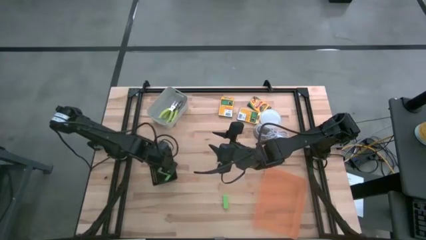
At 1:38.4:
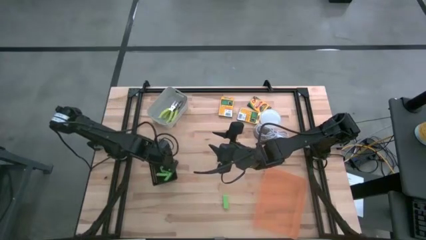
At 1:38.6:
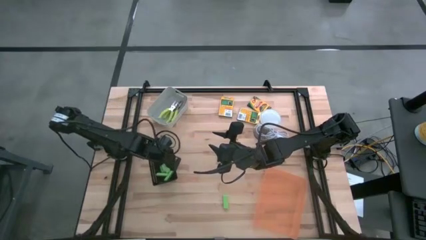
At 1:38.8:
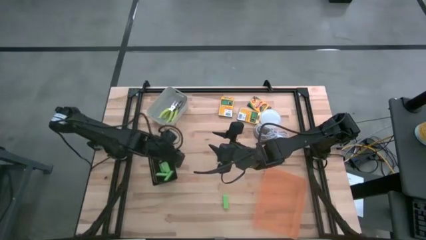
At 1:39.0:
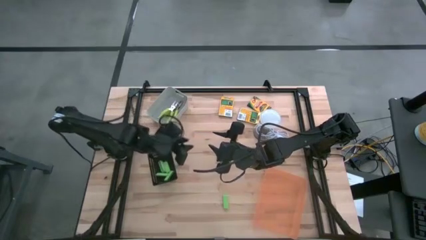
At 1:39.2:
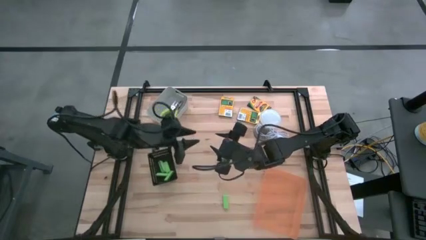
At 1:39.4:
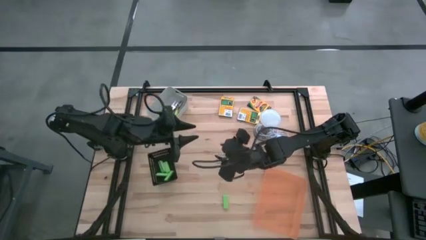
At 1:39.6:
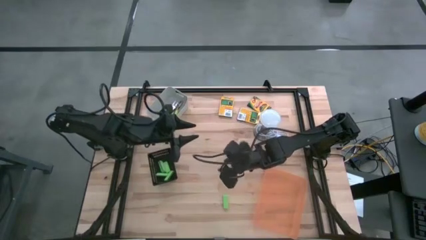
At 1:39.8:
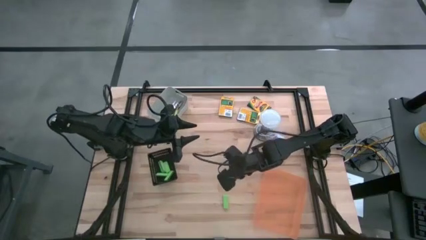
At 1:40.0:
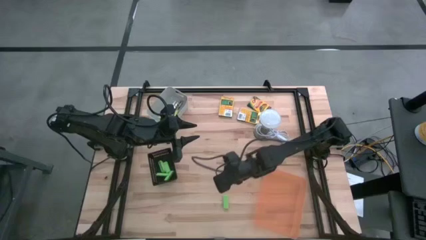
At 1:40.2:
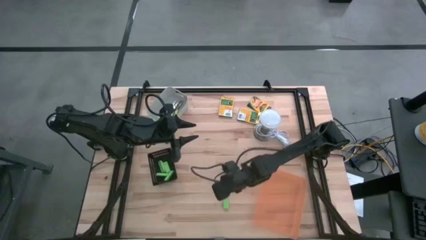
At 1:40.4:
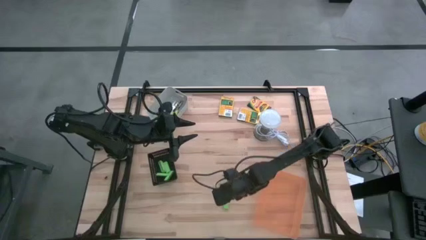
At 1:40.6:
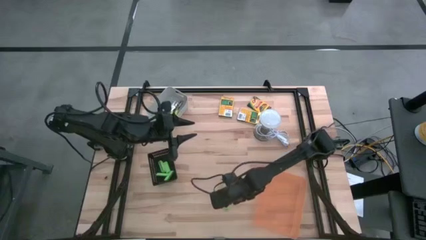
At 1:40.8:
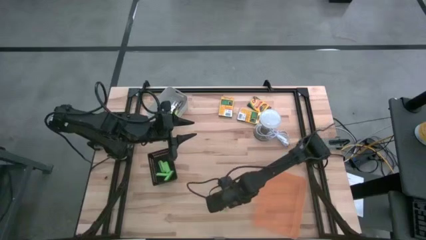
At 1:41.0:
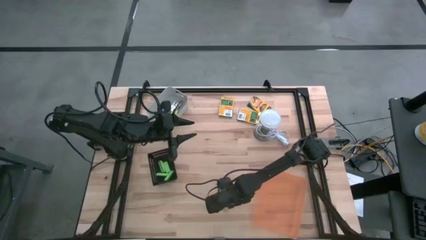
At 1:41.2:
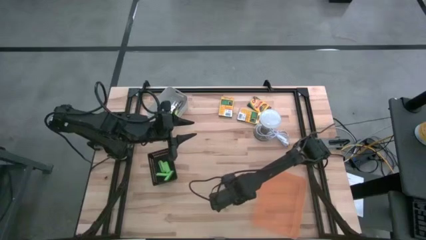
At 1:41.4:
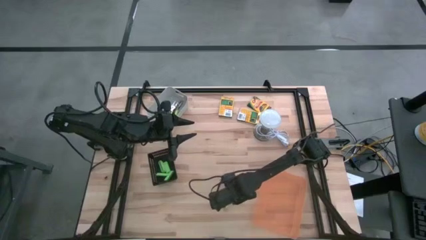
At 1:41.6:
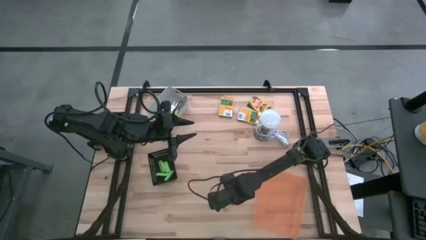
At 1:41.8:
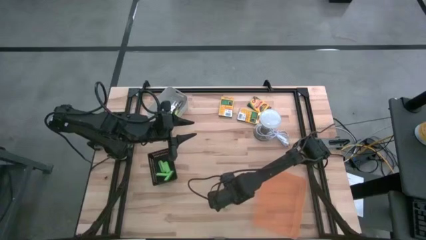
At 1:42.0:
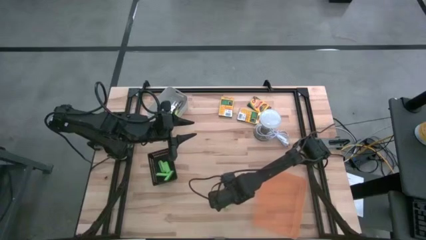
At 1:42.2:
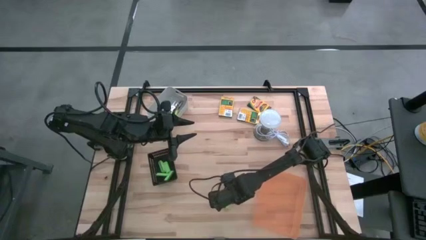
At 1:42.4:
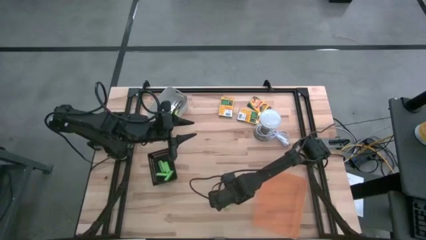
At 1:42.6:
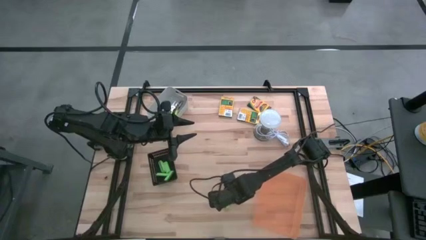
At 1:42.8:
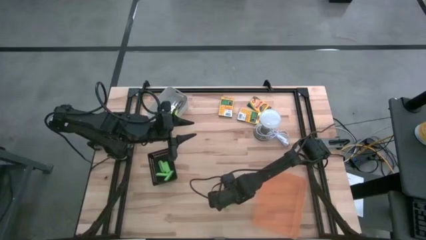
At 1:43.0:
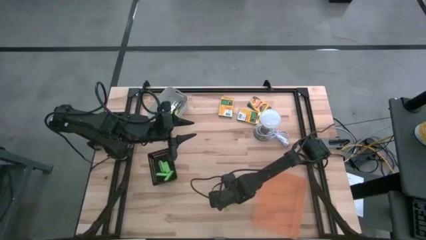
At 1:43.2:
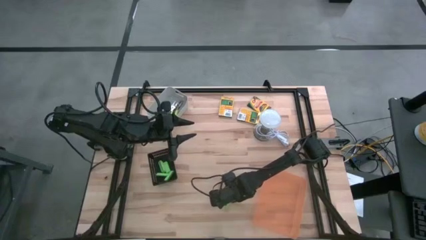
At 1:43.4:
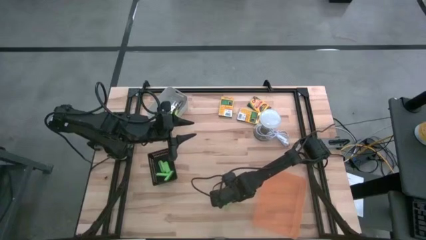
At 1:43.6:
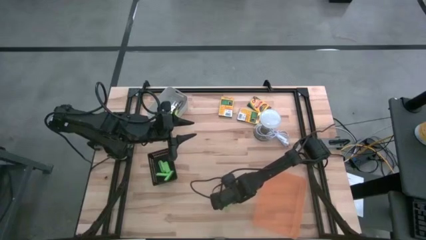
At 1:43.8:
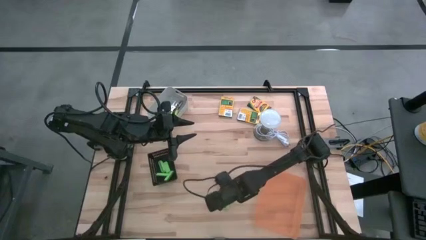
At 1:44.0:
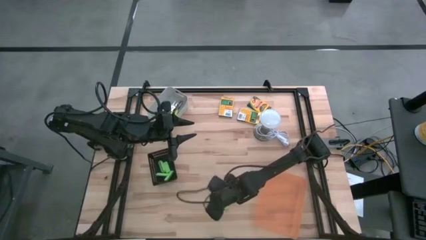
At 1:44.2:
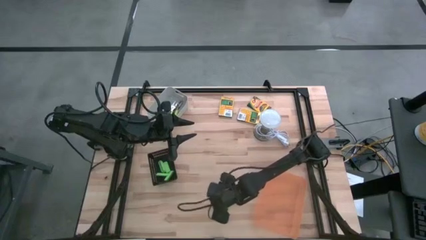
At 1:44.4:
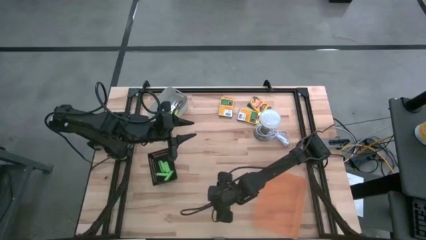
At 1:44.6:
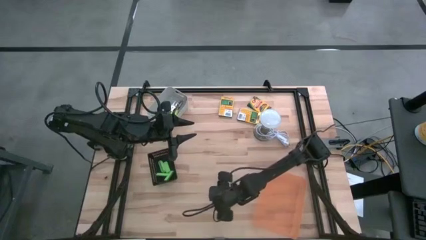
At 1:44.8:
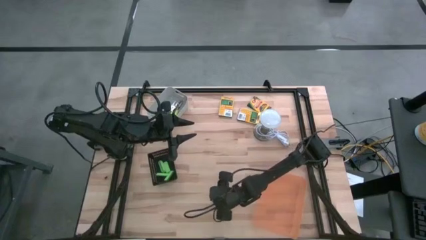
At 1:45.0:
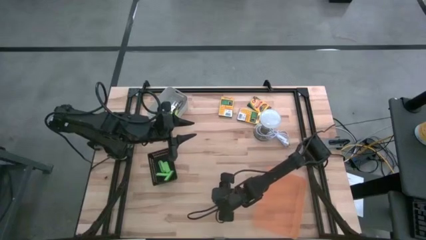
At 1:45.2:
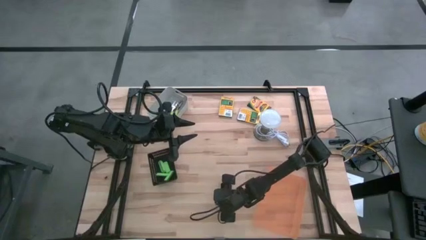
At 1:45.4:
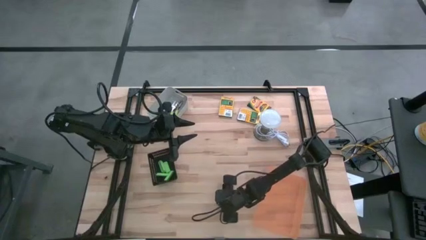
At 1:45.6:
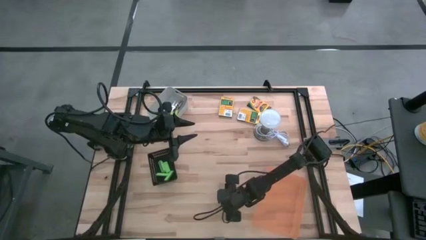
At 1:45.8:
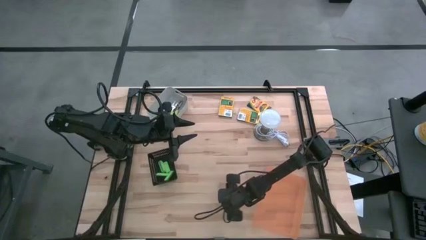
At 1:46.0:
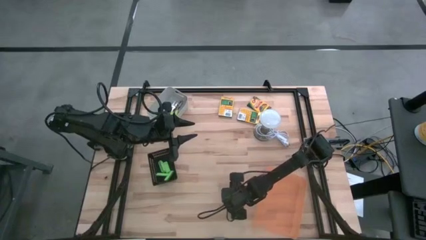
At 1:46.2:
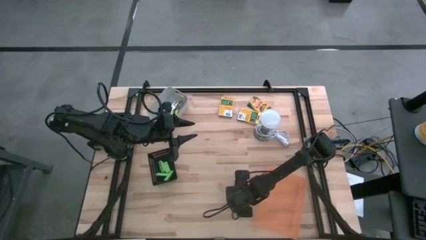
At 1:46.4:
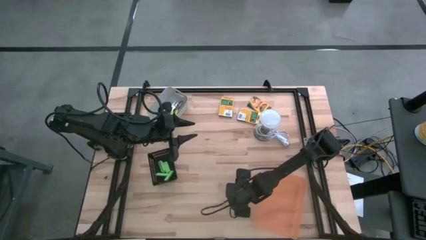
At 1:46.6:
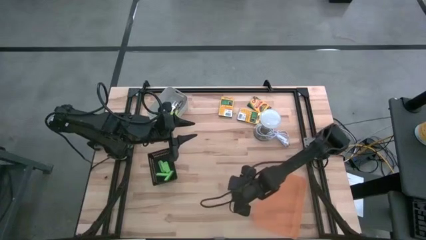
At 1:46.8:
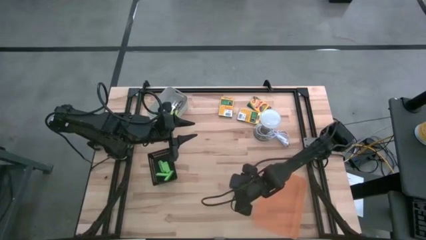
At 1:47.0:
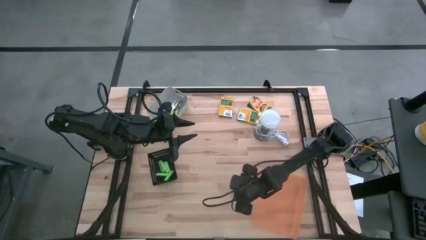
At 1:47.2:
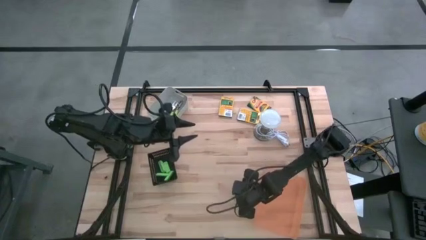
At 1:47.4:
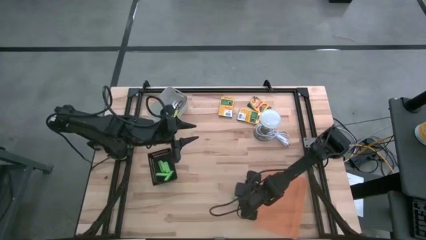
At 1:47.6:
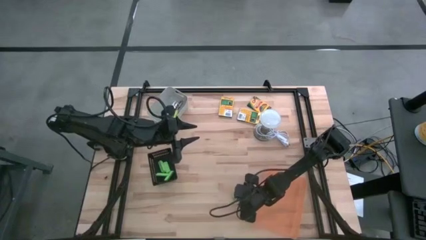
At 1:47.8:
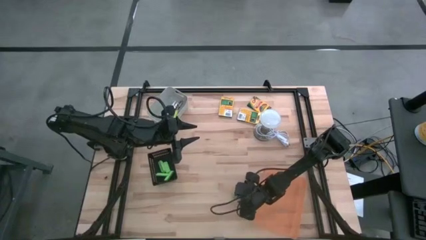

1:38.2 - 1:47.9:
Task: Pick & Place School Supplies
Put the green eraser into the black bin

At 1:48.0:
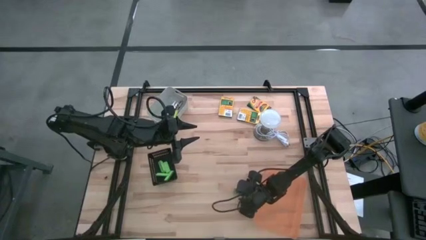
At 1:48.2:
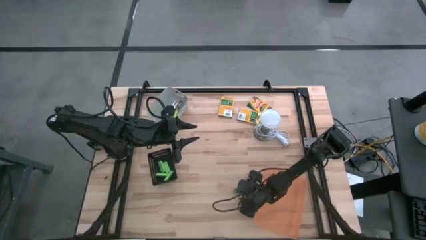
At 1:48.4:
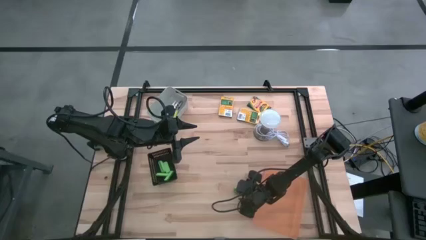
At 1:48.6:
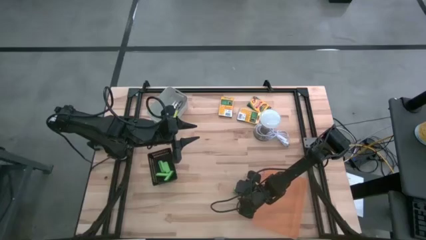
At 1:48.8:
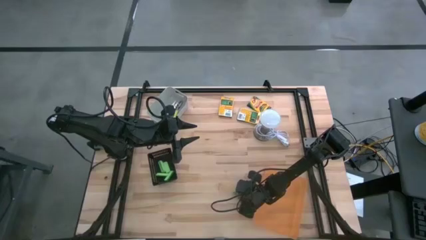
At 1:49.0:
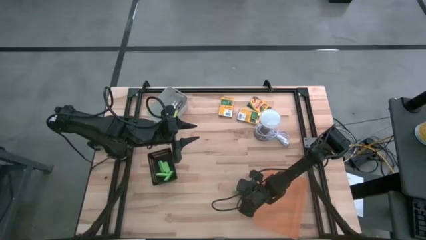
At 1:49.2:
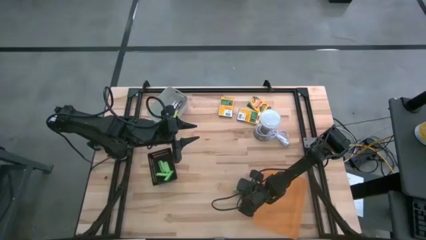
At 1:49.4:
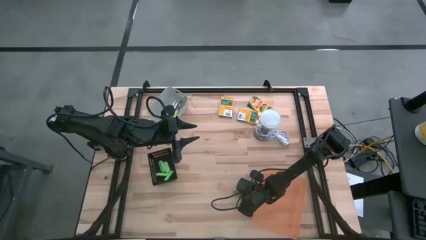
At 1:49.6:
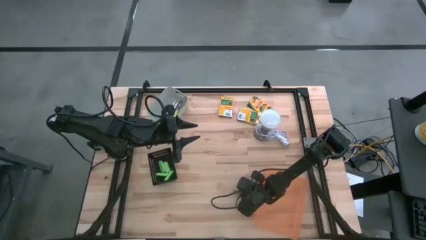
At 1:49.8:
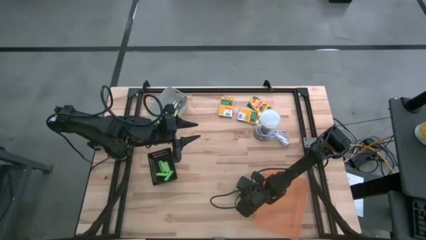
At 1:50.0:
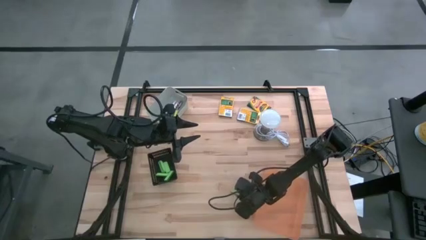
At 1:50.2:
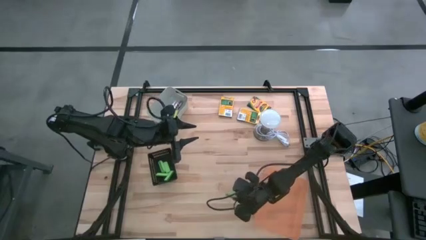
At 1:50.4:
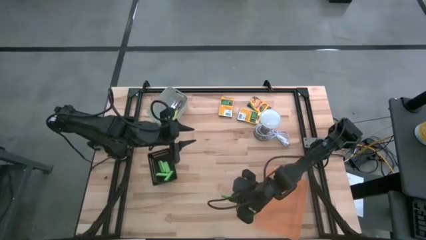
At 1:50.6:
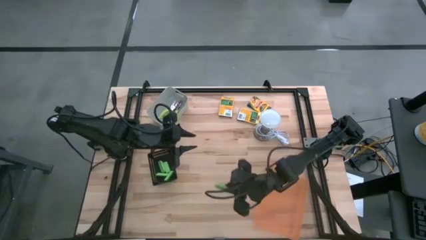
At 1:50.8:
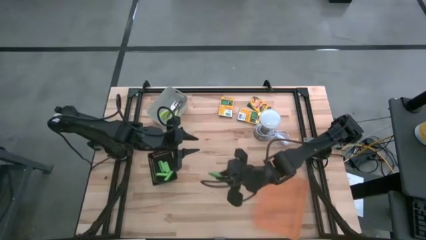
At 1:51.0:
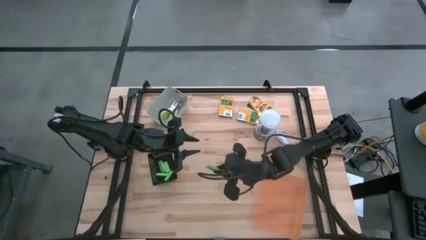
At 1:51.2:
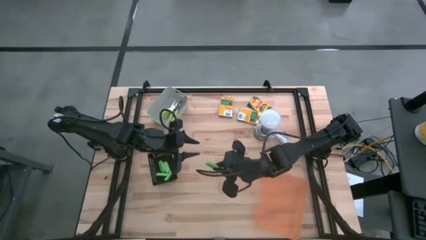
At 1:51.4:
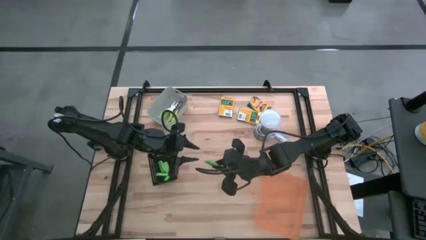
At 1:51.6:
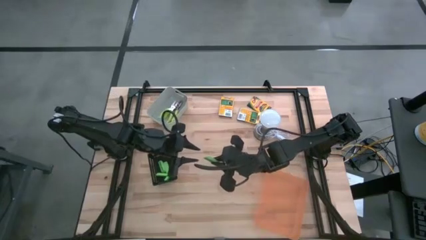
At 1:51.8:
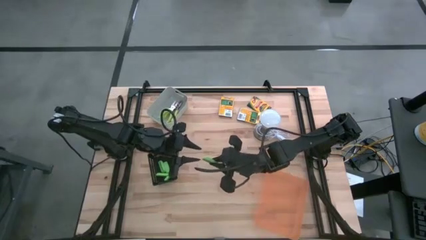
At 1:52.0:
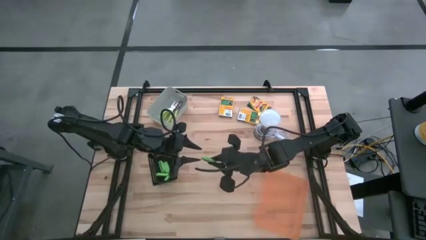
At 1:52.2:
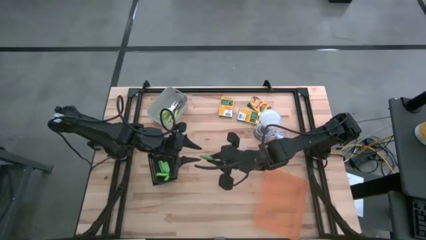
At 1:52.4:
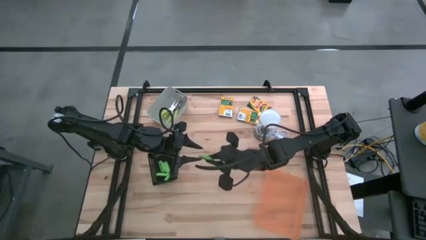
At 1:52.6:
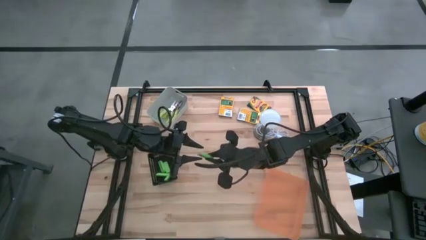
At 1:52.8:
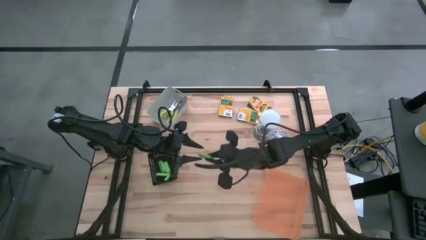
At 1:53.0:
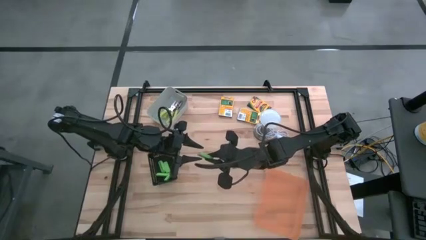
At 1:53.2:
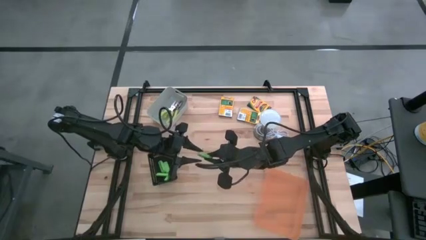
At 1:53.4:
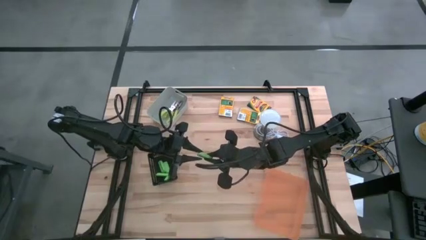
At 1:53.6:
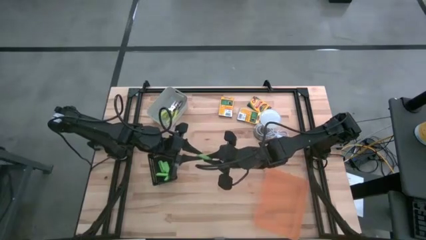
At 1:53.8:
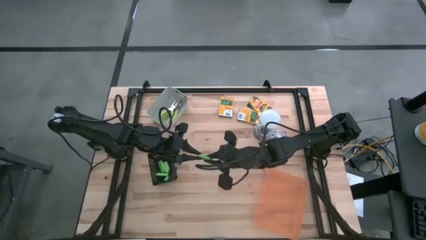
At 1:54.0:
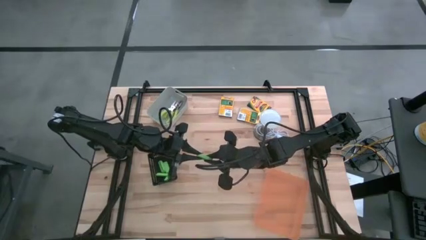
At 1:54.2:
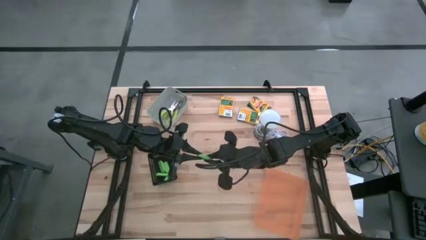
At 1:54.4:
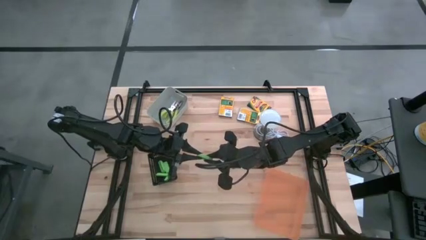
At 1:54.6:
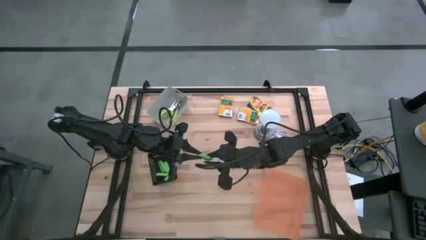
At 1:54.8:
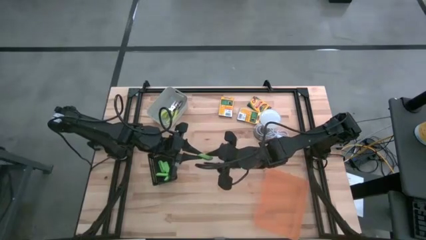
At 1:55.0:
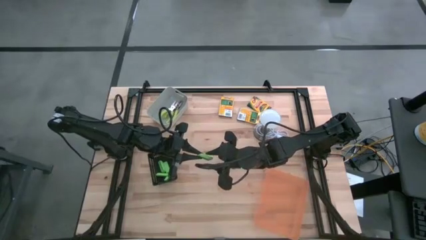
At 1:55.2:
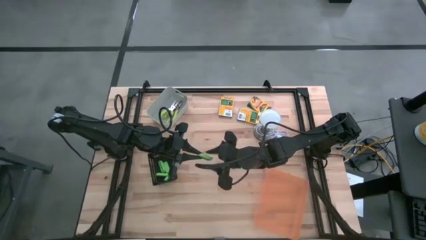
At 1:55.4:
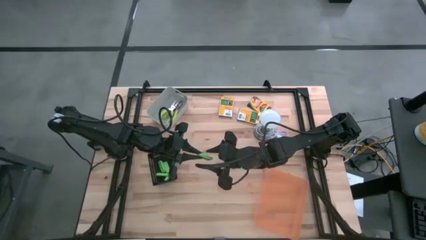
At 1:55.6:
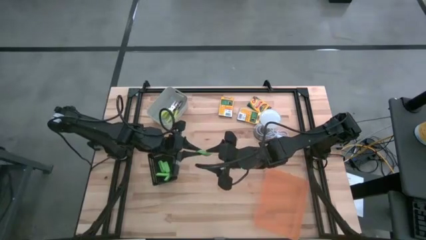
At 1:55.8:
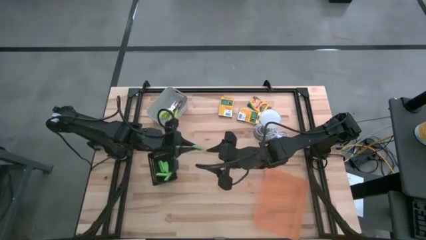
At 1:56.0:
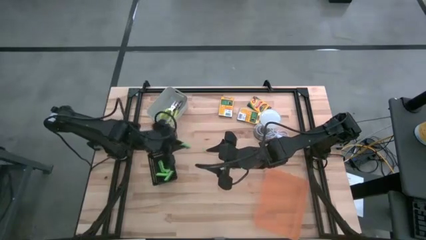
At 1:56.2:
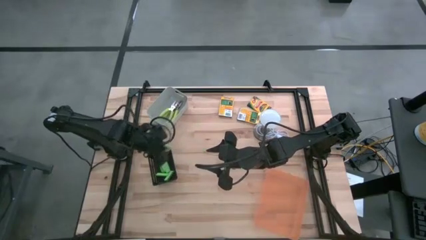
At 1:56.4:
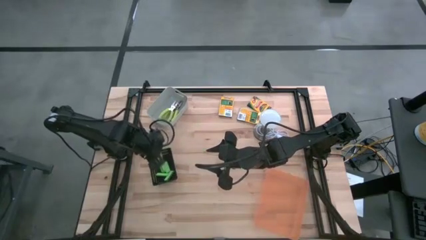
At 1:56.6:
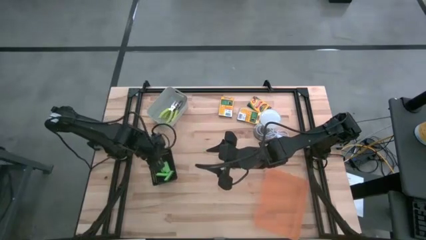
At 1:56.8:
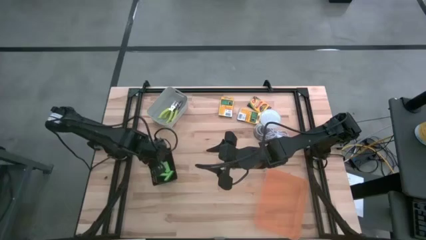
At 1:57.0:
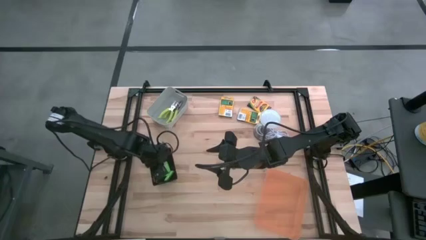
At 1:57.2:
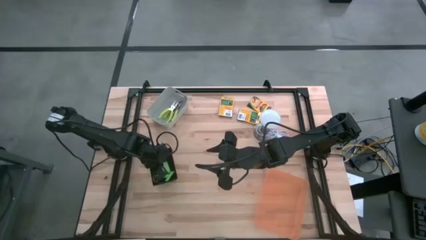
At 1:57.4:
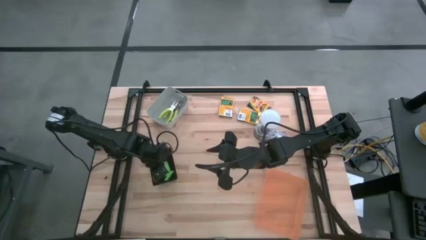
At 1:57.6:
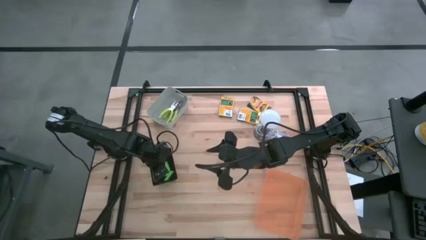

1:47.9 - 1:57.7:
Put the green eraser into the black bin
